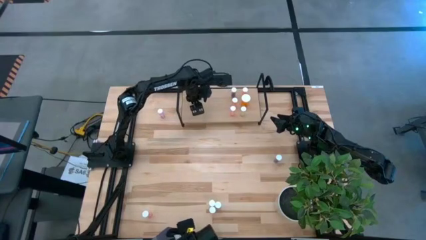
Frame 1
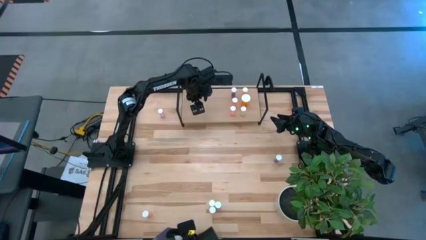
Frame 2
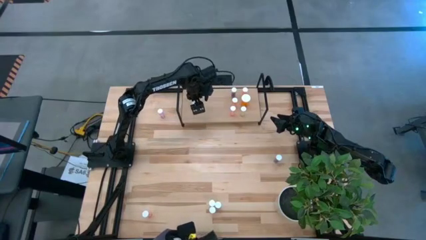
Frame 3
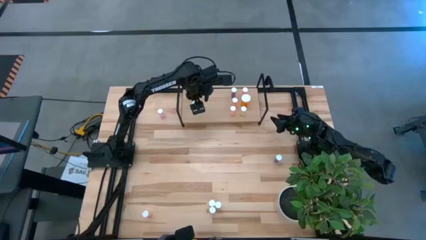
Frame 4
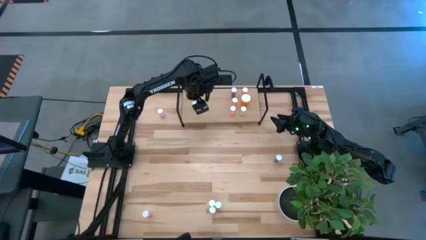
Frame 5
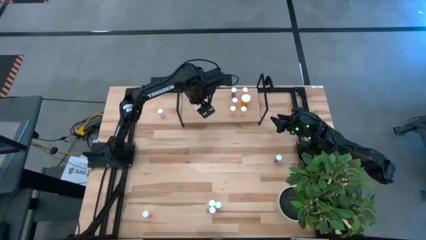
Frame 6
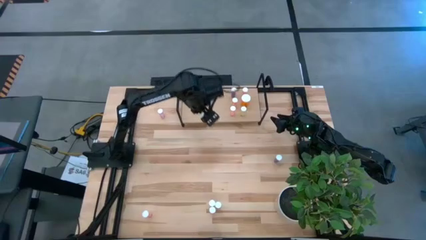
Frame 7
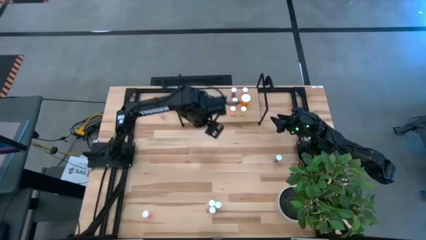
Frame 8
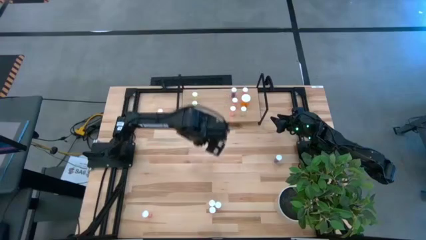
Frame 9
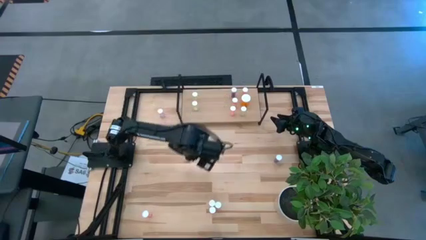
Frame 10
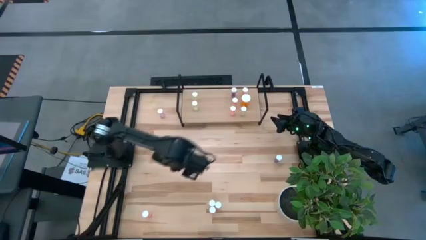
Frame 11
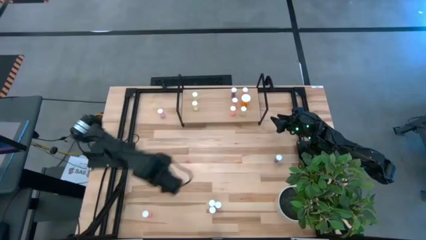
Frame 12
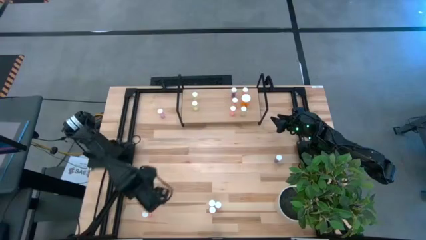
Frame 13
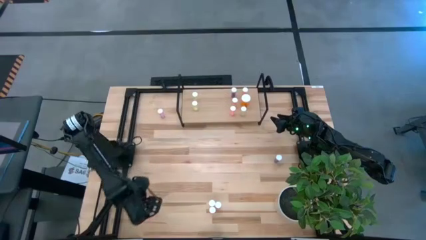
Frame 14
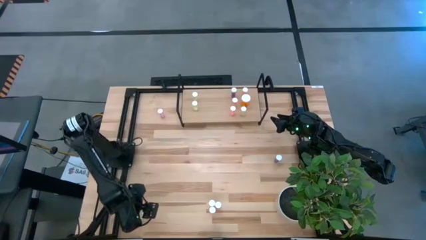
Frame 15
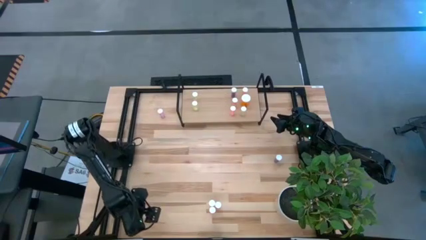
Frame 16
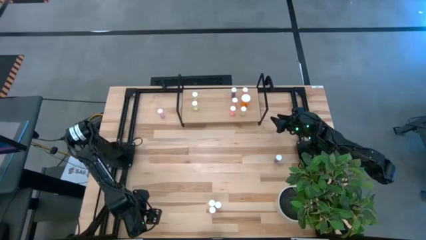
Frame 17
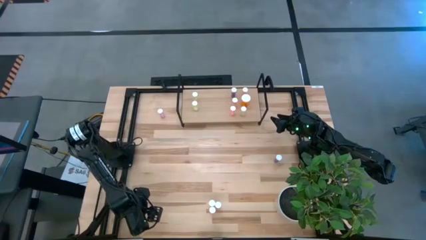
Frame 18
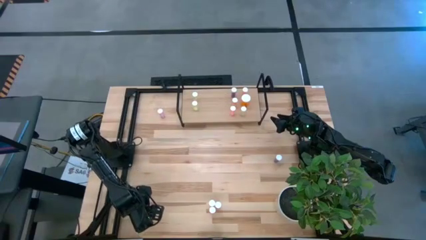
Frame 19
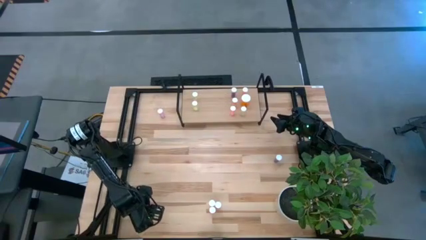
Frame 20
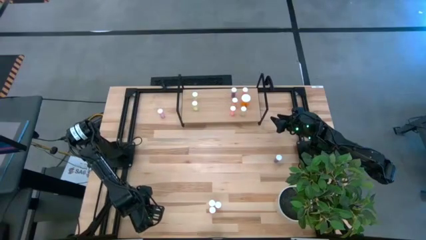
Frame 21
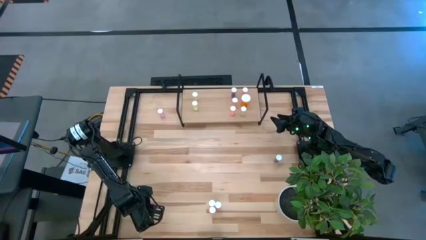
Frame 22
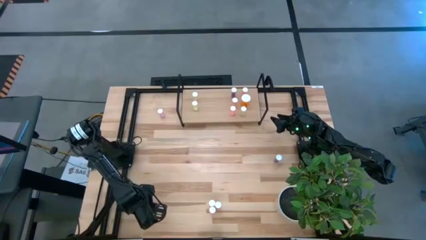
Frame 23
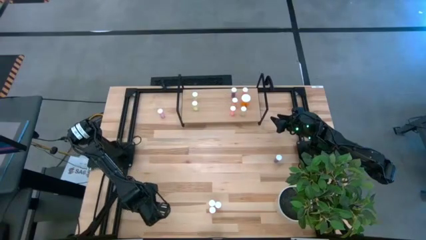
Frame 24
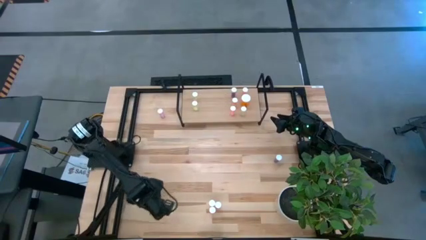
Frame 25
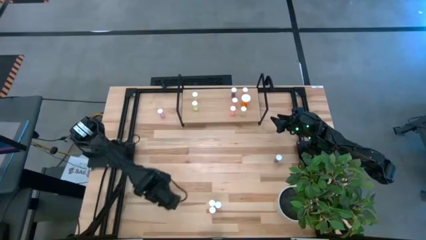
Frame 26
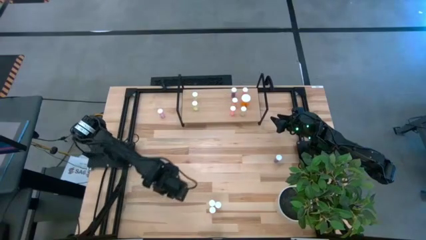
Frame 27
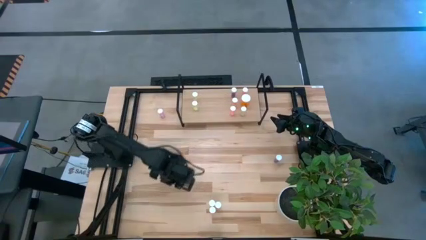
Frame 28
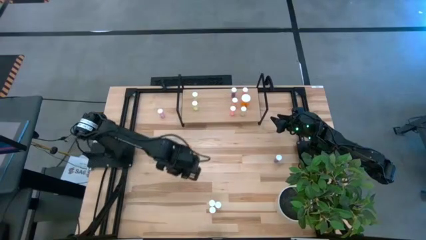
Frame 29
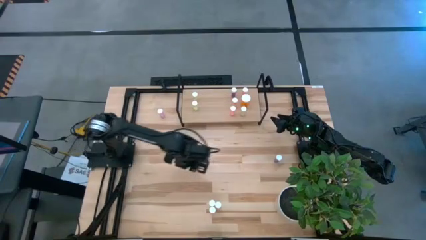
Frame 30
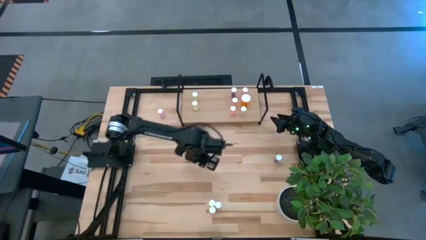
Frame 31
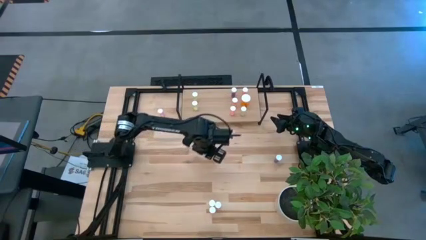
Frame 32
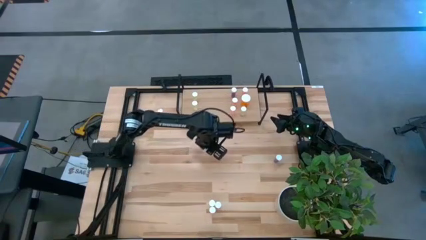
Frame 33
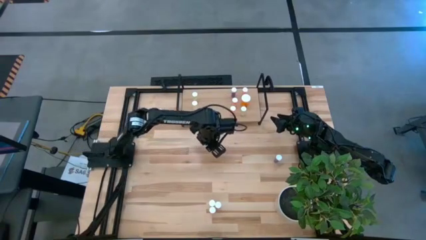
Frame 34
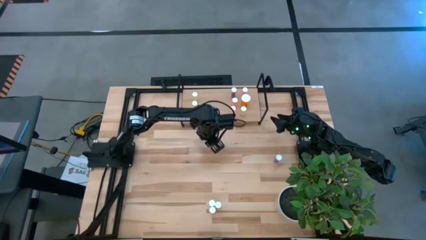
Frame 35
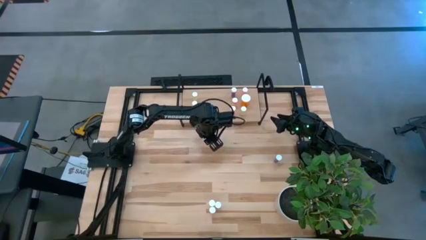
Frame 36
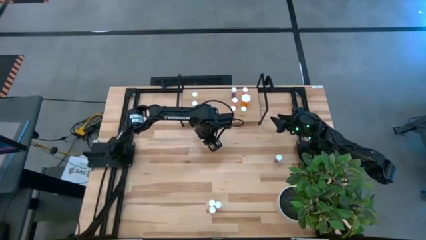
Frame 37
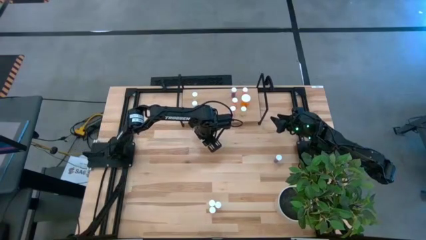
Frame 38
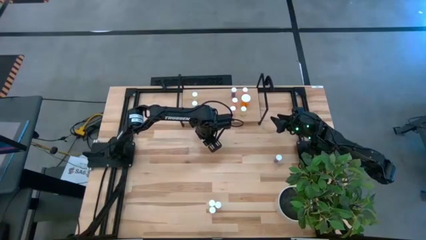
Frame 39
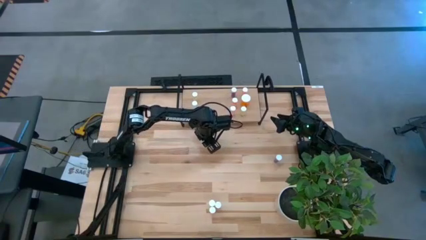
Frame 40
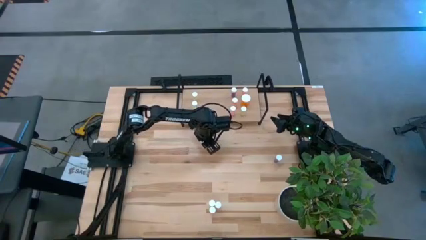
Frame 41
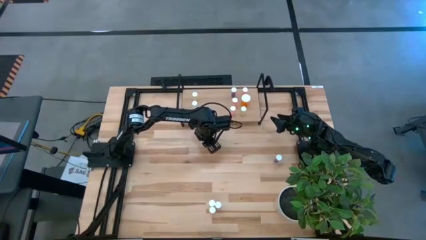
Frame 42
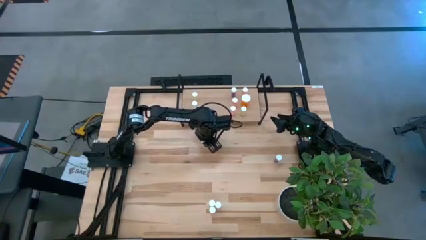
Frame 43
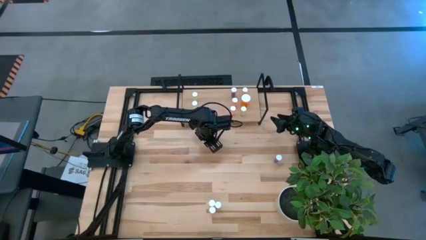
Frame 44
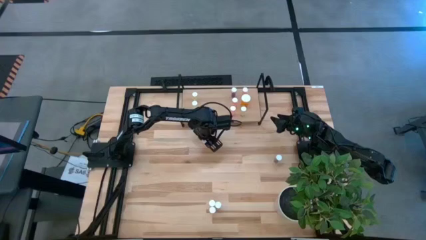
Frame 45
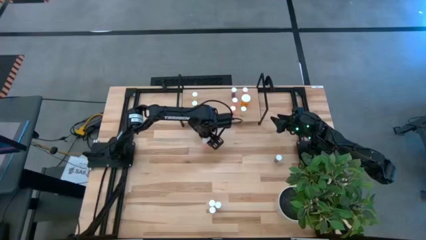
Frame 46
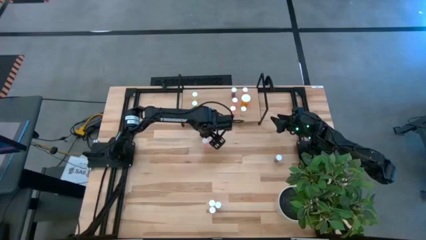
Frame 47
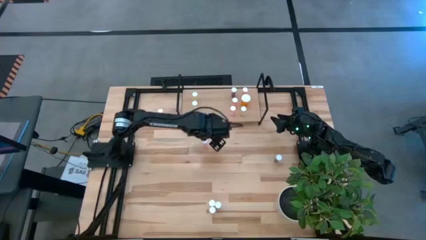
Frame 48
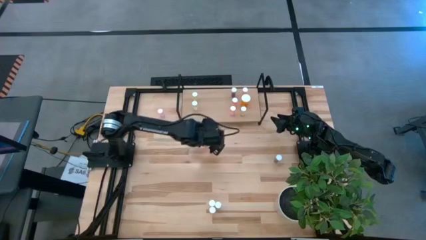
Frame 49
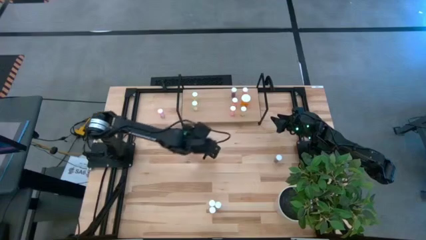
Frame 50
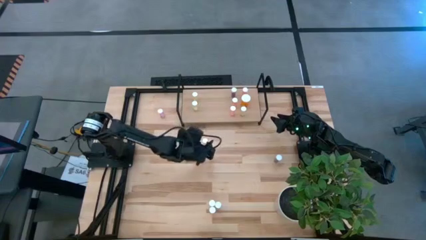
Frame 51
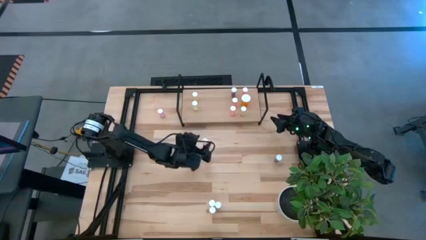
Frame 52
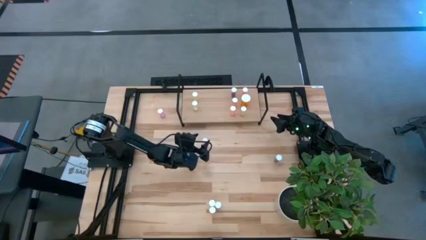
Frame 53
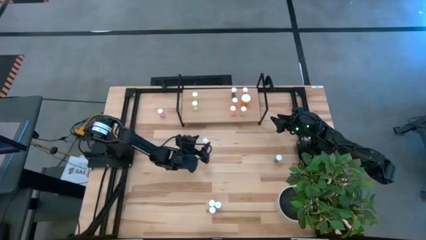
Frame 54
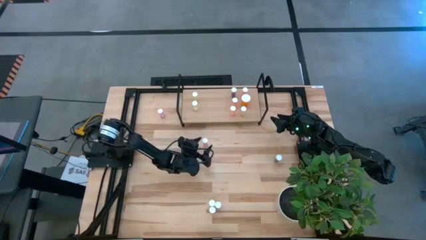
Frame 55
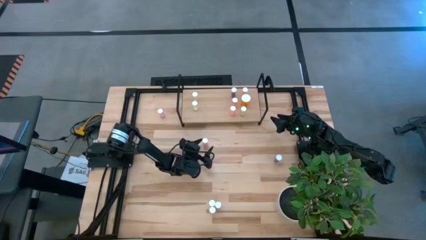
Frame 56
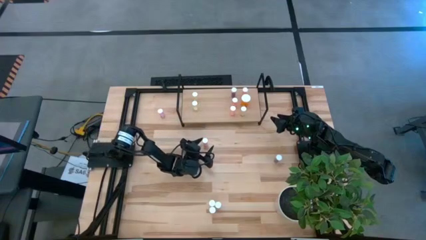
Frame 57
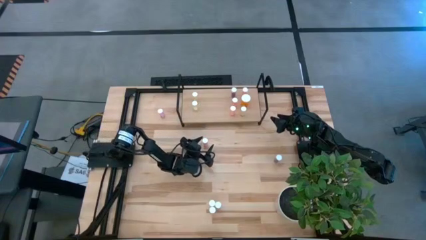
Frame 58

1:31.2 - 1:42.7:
Task: Pick and place medicine bottles onto shelf by color
Put the pink pill bottle on the shelf

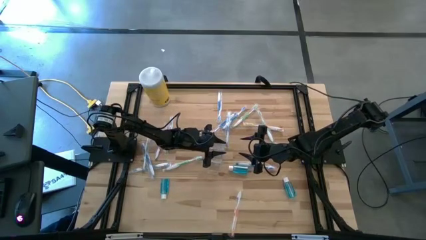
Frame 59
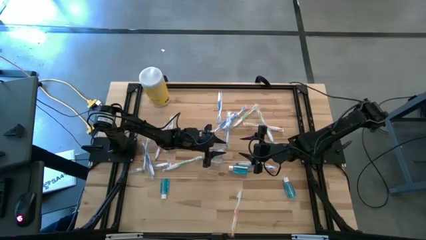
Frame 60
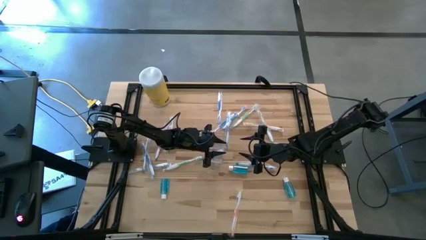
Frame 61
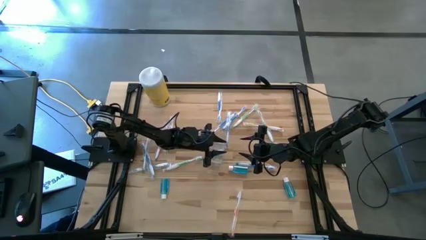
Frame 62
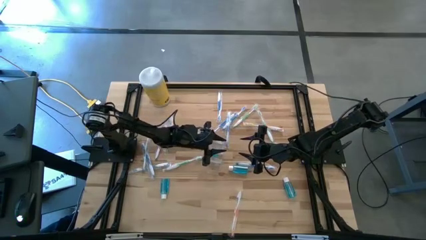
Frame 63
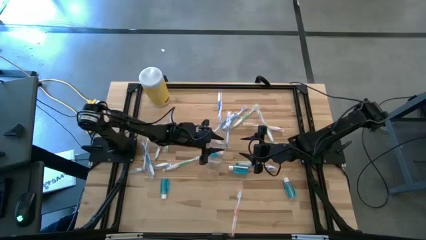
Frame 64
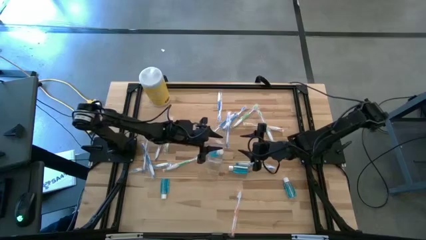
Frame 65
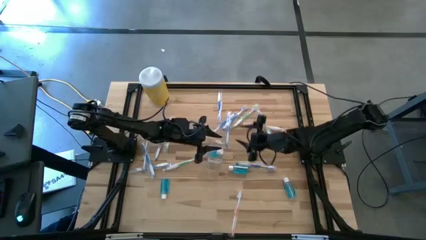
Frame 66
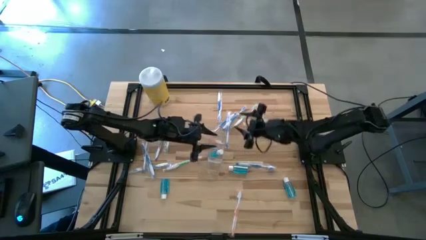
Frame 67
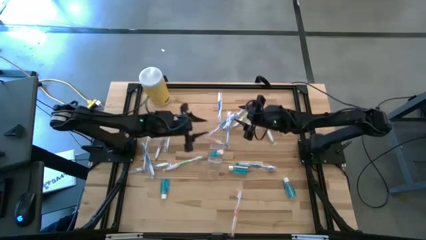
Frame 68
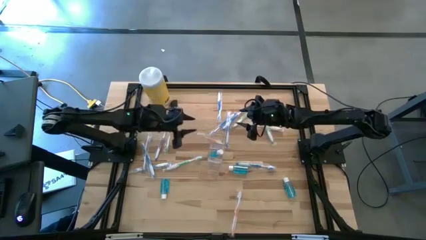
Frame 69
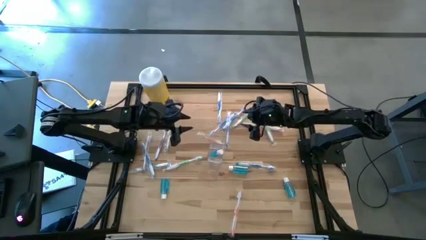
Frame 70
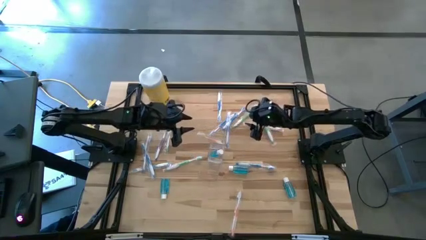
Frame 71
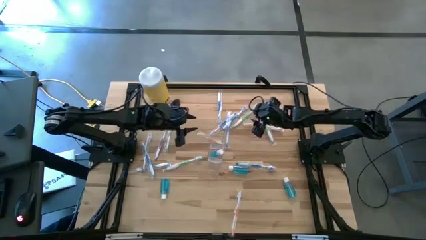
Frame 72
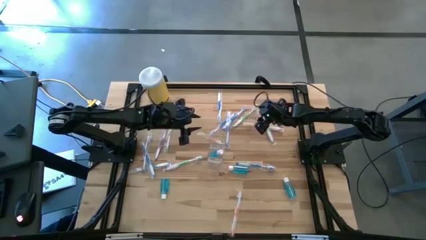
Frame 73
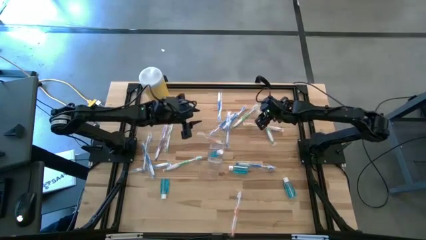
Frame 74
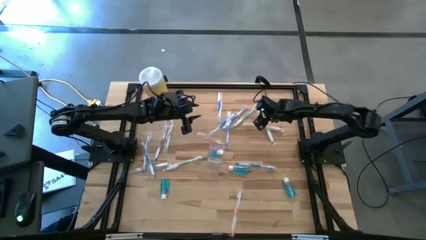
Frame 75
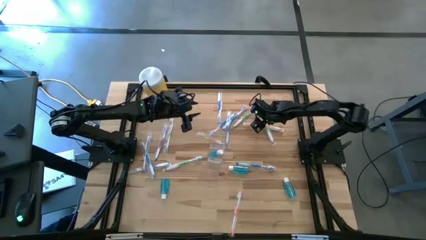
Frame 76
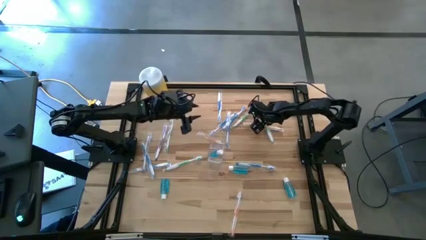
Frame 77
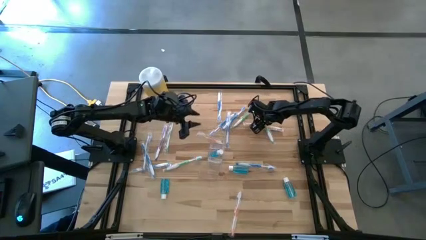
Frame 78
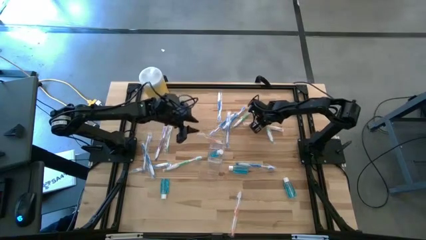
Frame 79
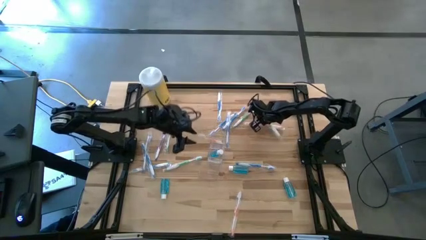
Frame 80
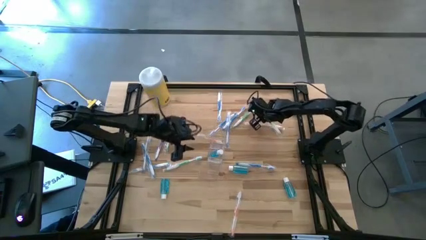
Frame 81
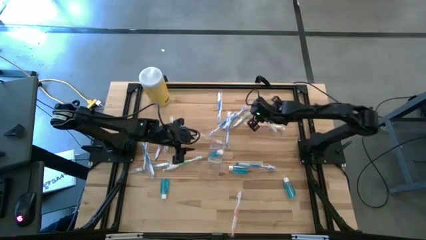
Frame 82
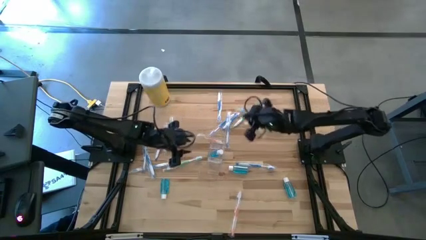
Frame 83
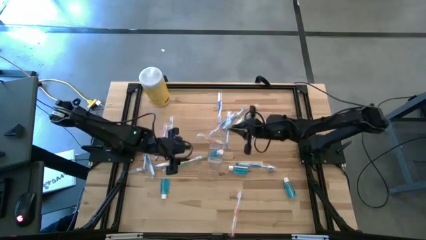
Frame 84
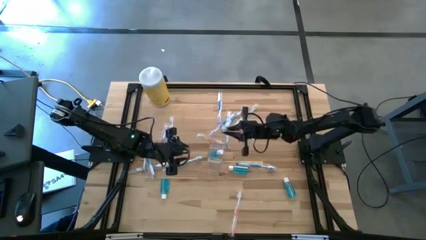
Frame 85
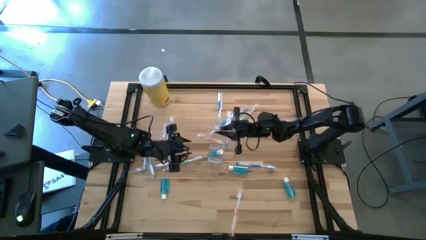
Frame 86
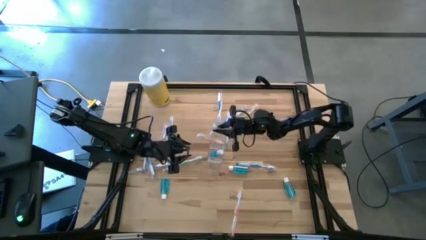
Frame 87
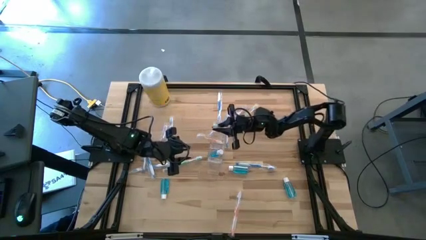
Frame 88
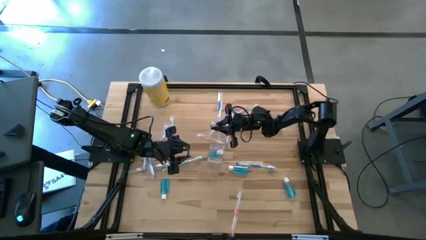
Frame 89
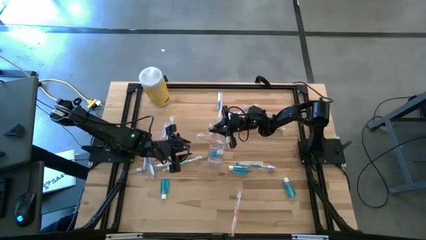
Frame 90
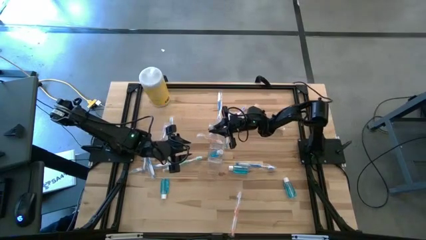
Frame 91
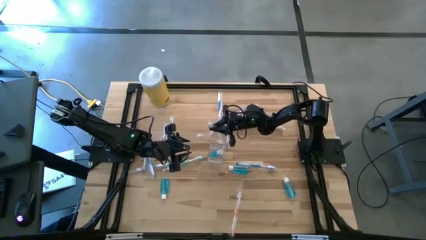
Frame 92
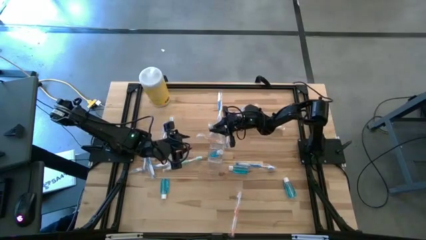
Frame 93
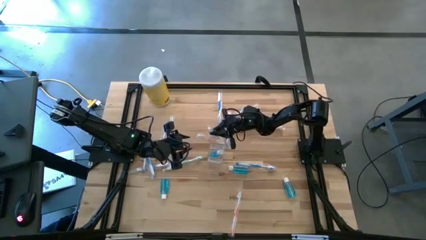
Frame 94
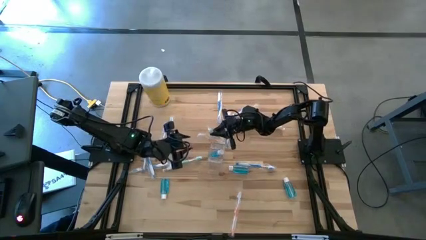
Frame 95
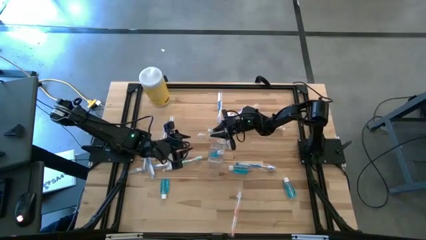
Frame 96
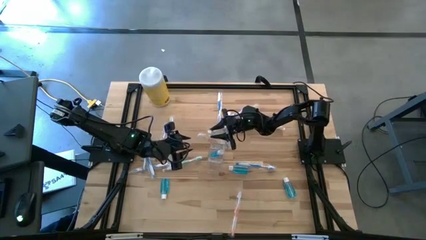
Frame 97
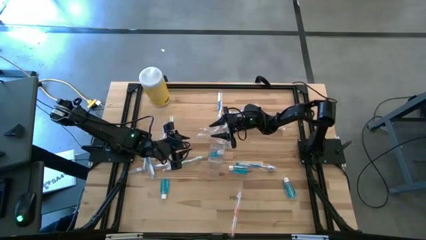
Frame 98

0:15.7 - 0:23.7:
Task: Pick & Place toothbrushing station
Put the green toothbrush into the transparent organizer
